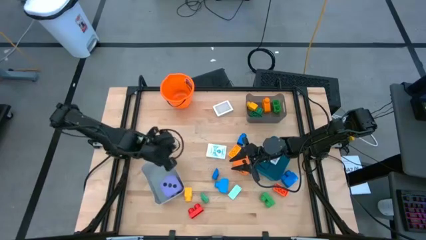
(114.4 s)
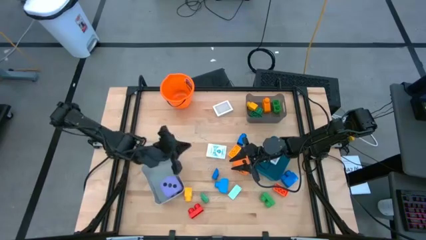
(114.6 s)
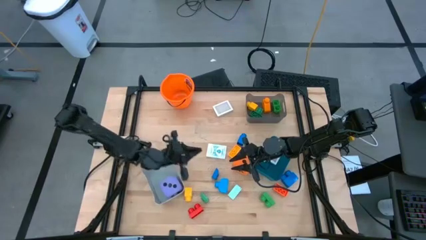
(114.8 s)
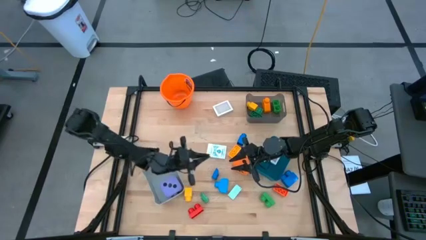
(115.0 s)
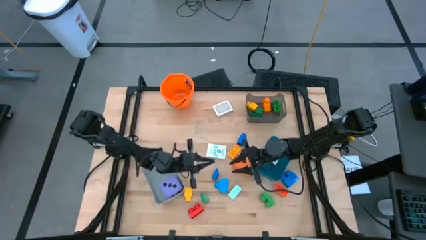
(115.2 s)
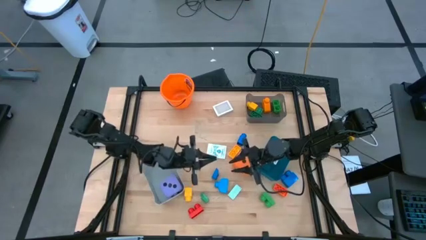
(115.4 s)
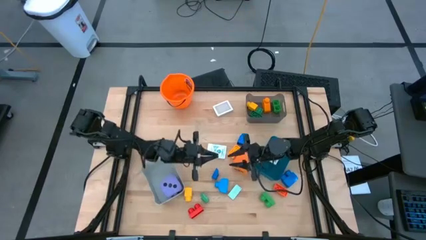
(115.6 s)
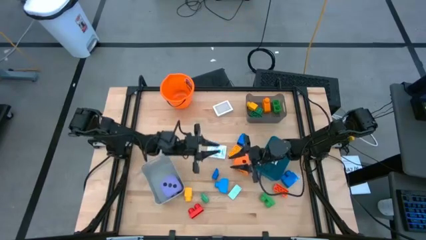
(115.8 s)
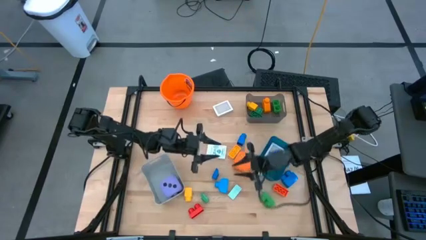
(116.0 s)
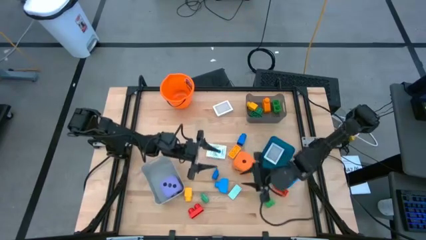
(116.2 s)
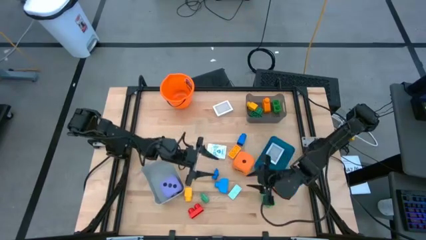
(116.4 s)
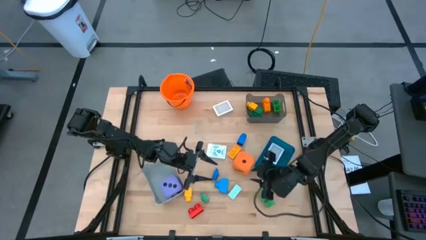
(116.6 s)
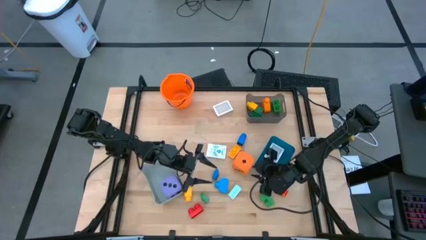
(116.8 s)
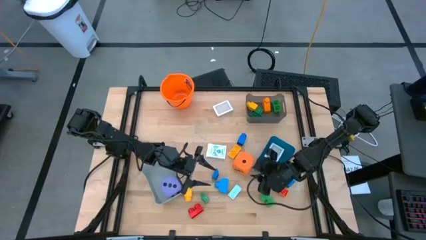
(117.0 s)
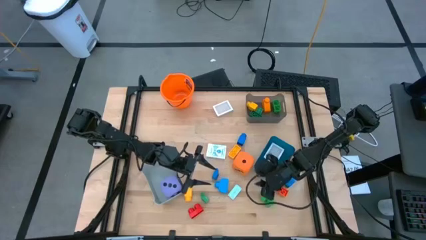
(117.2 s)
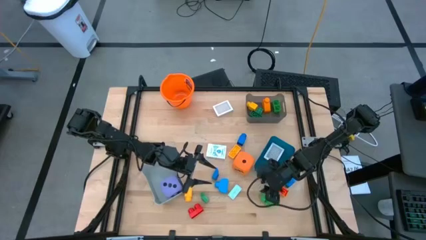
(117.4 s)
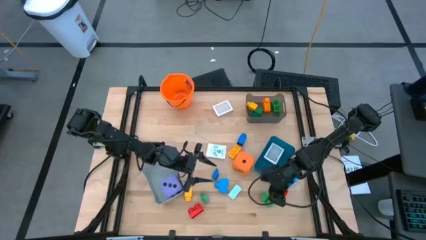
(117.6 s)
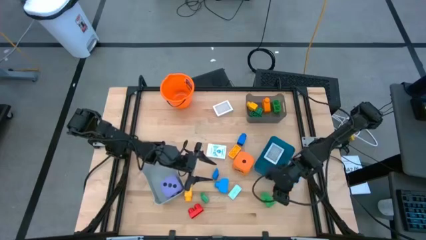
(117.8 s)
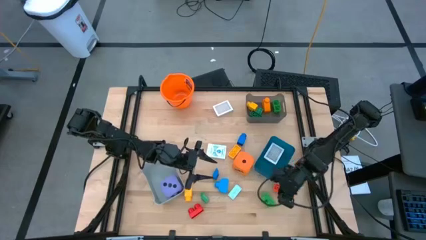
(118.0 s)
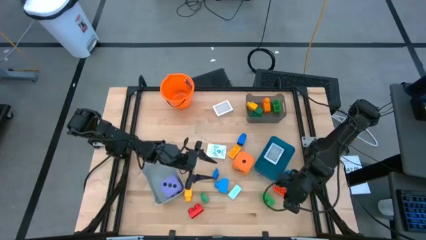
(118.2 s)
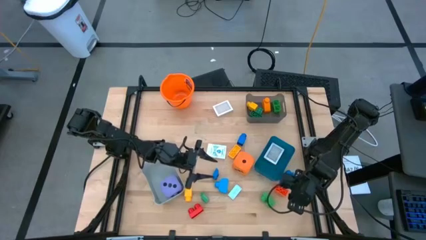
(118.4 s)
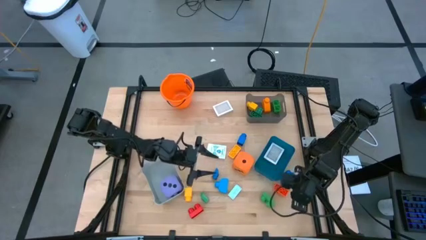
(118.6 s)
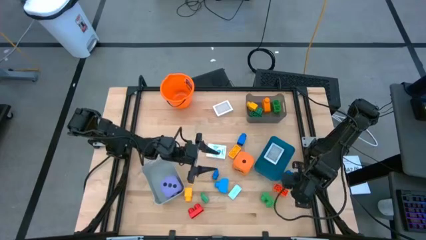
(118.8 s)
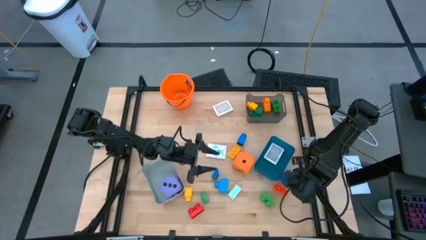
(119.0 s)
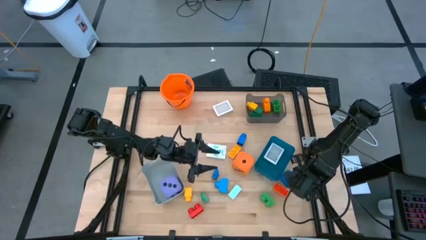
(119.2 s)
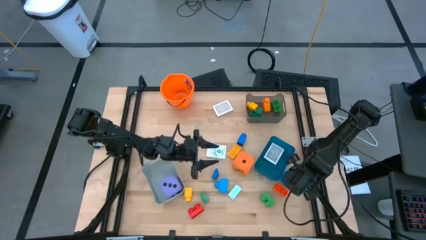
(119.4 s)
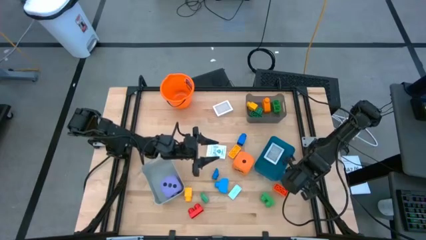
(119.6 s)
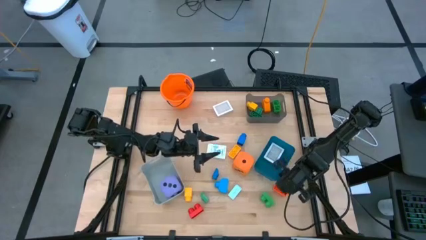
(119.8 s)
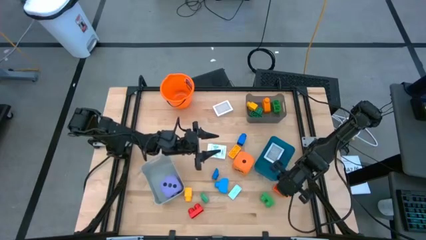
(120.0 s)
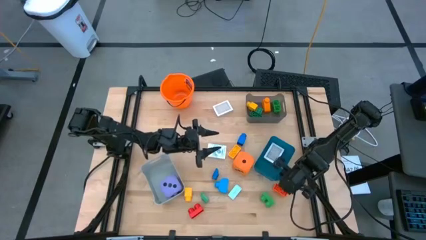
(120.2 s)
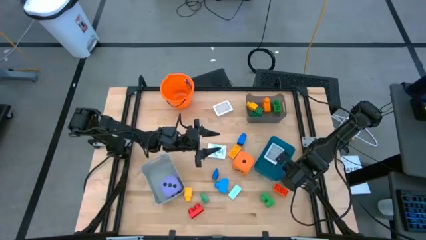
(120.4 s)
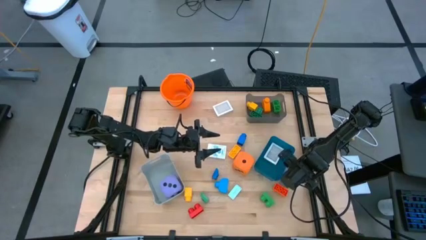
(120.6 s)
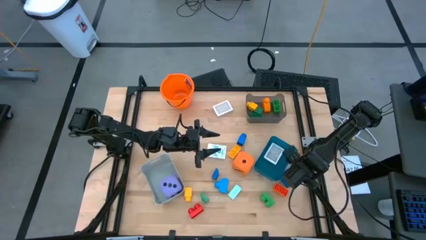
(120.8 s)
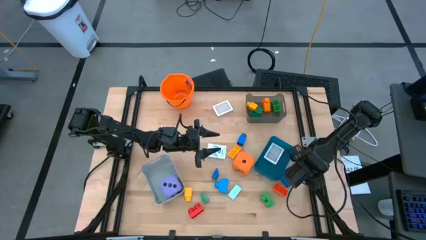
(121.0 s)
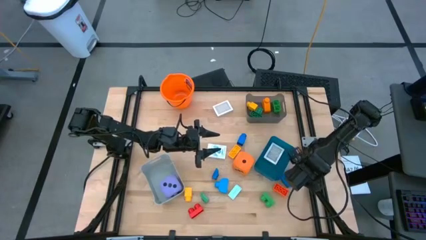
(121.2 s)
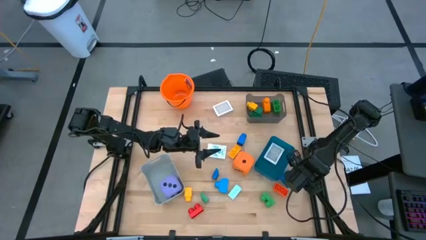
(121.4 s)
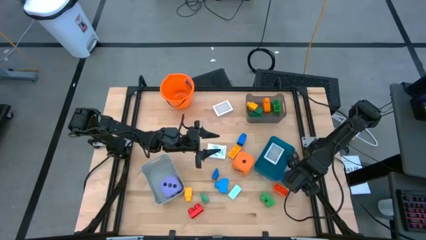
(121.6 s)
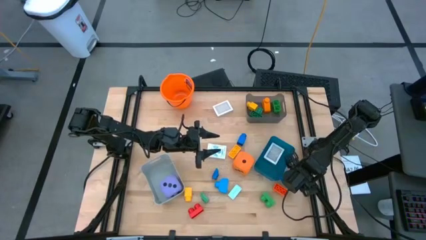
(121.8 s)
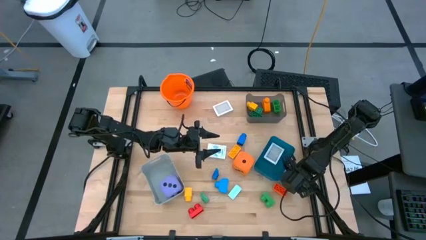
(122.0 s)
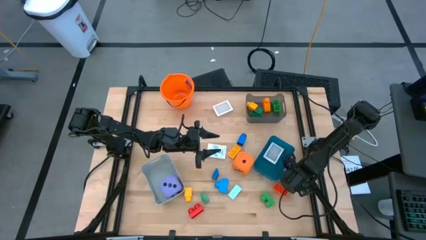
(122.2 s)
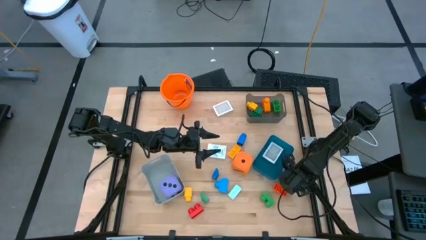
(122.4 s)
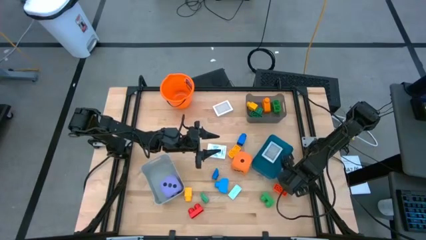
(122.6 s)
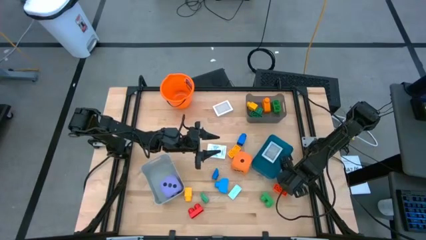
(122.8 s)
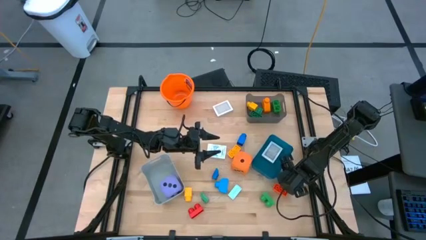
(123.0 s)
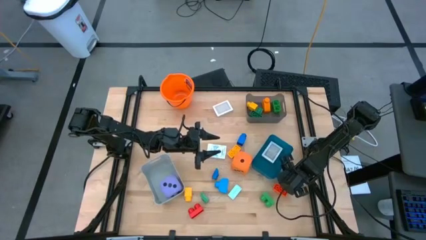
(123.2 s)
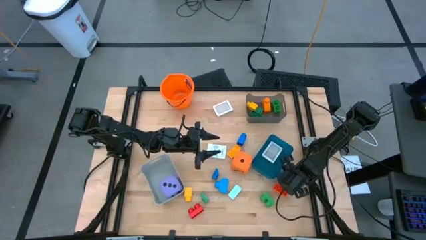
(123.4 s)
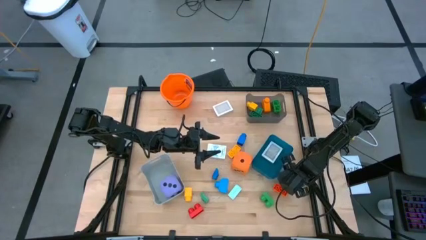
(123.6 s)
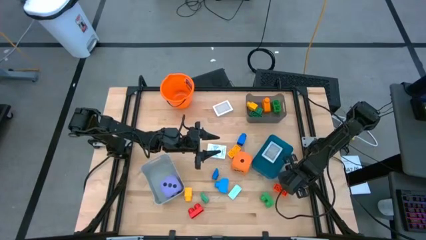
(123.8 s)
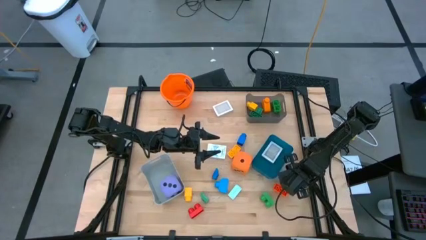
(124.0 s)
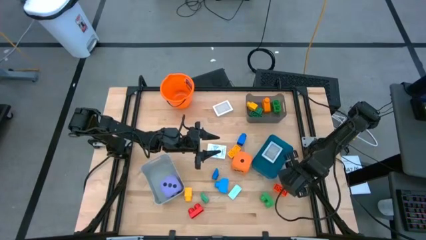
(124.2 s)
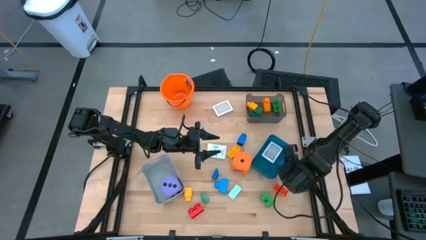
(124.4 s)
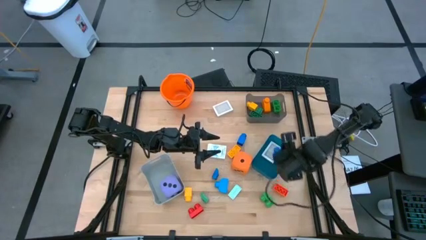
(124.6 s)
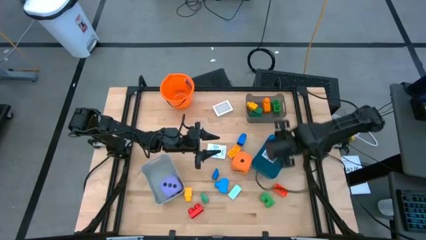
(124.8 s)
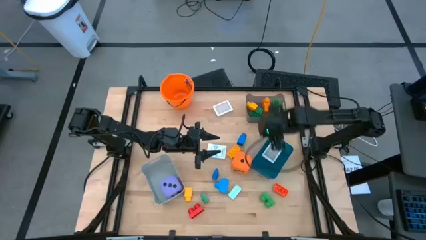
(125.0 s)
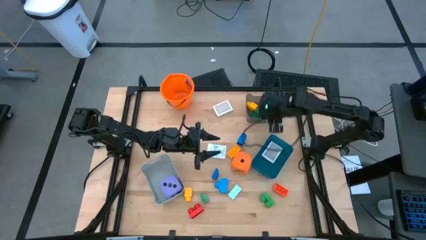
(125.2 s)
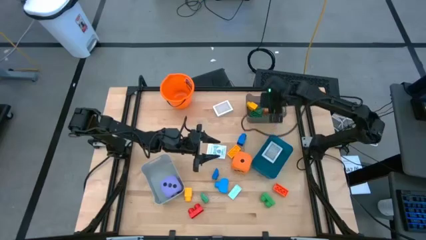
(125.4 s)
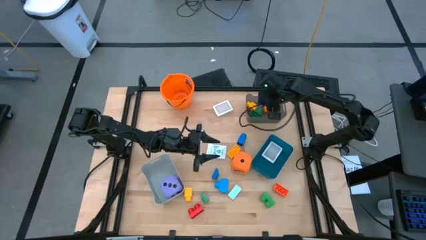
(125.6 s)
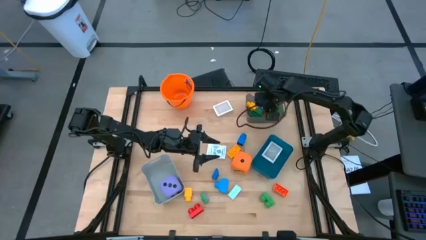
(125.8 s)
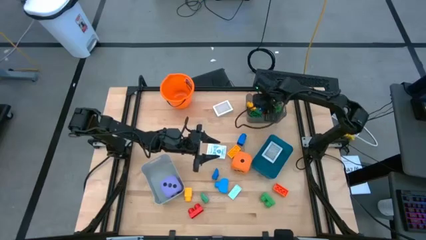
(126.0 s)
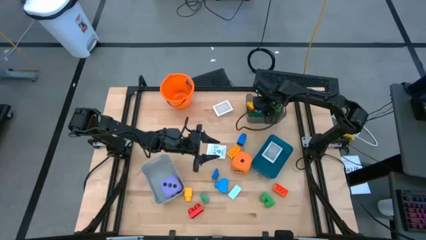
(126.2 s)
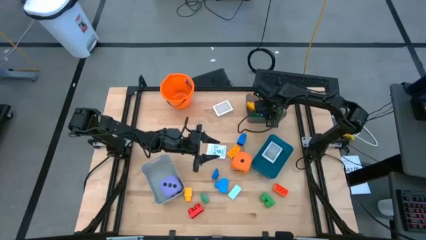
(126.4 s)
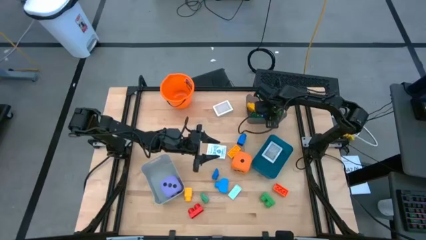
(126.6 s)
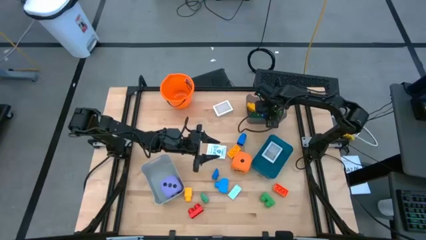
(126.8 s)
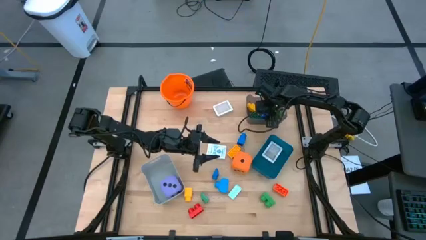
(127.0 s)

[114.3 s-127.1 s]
Task: Pick & Place Toys
Put the blue game piece into the black bin
